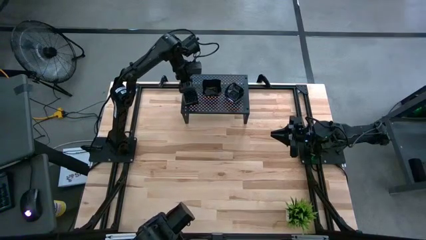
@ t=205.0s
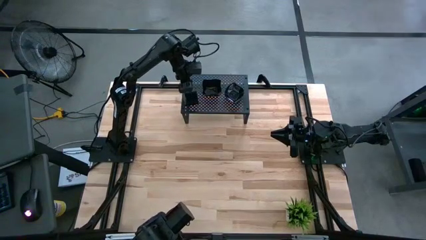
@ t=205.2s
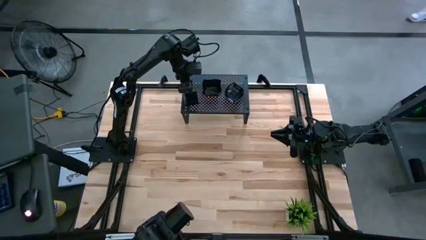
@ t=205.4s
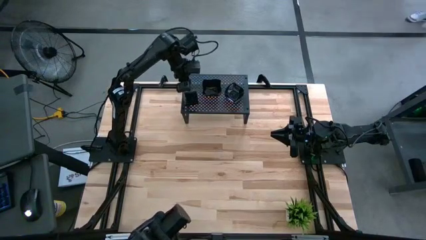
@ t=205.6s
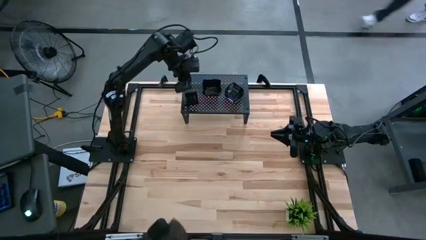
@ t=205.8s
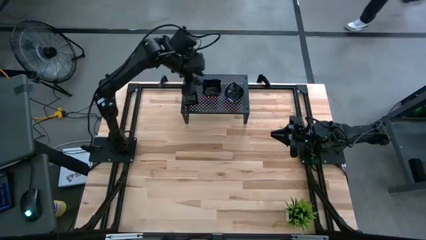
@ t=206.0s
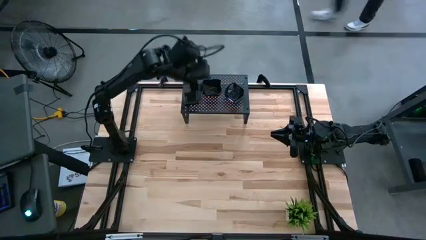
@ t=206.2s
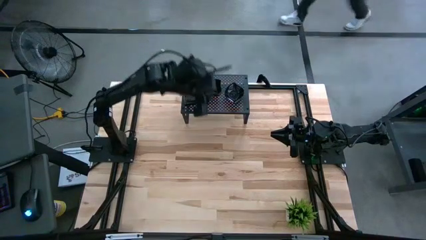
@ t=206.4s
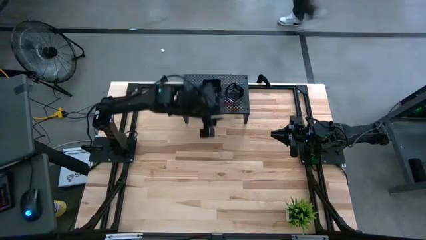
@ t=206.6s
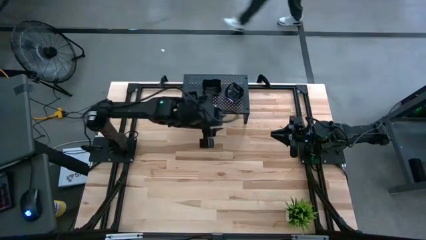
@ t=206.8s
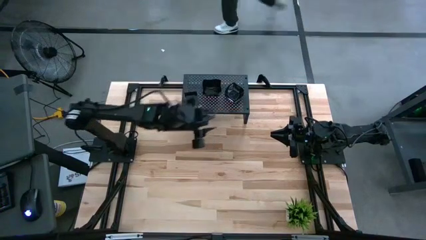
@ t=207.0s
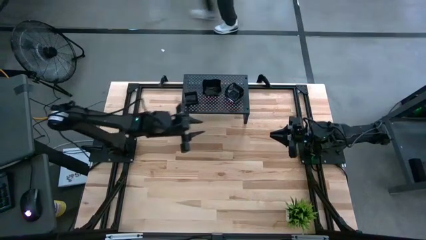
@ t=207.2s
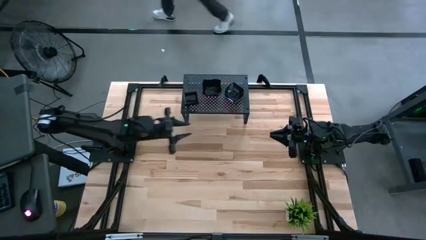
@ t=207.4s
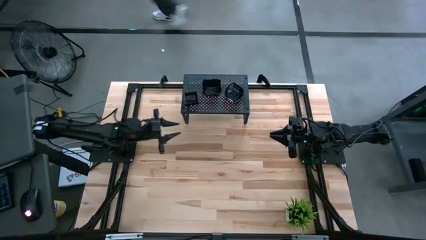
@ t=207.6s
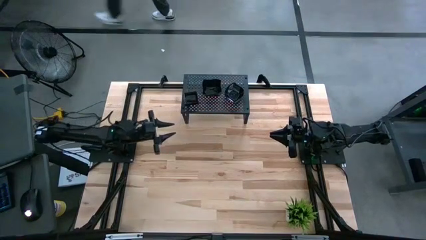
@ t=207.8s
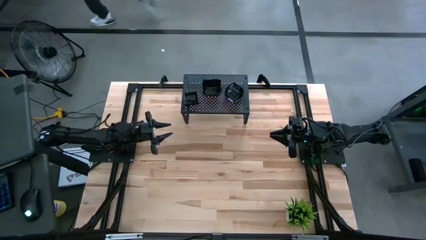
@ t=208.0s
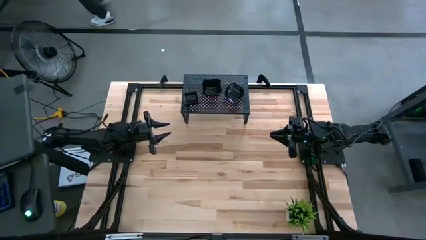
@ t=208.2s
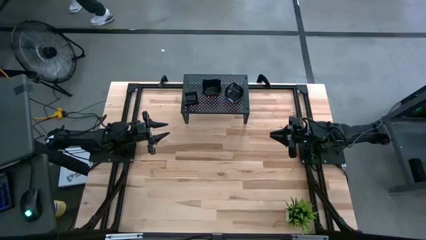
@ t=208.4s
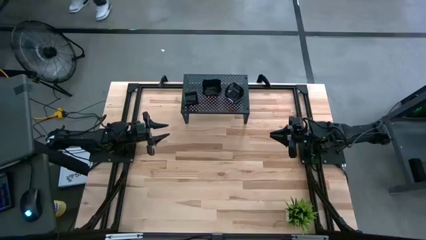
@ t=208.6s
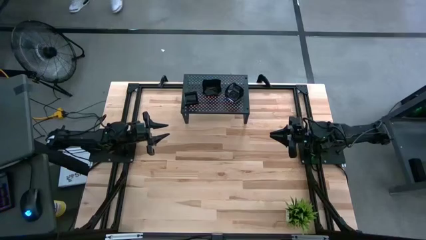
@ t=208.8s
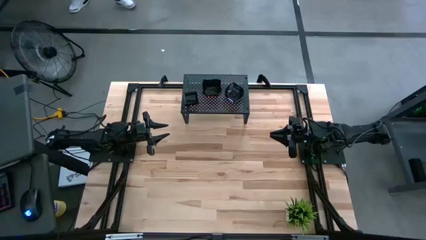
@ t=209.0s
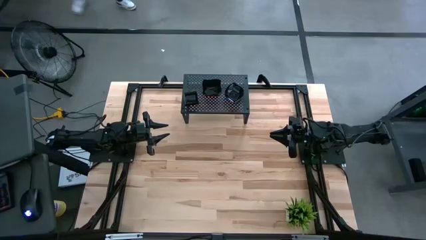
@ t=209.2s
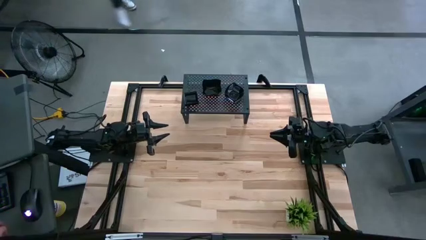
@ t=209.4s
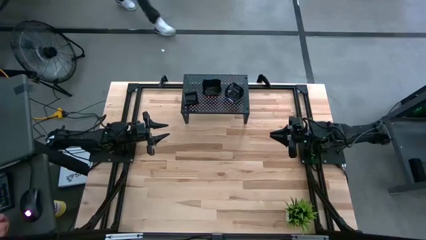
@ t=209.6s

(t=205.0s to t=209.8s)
Task: Pick & Place Mini shaped plates
Return to home position

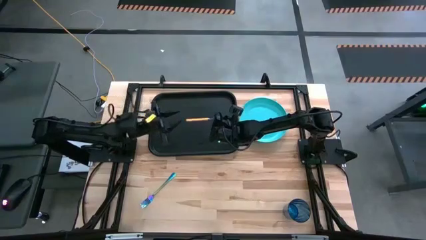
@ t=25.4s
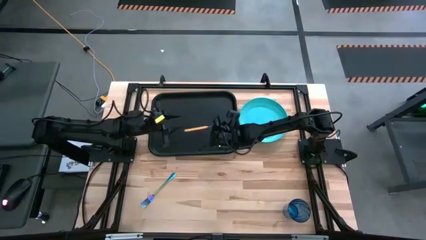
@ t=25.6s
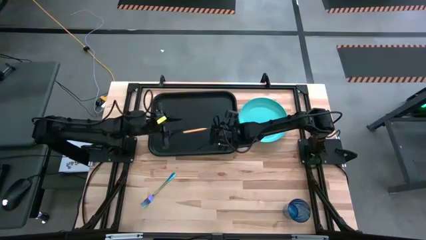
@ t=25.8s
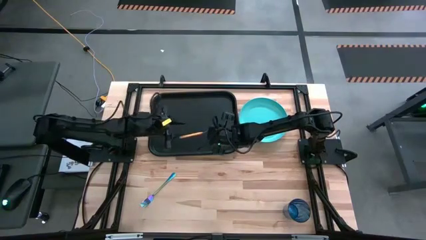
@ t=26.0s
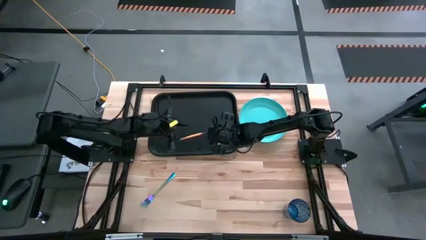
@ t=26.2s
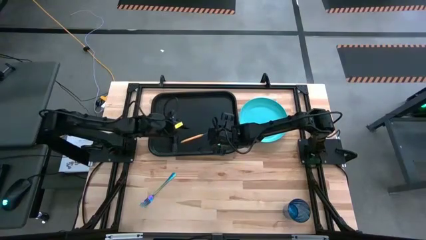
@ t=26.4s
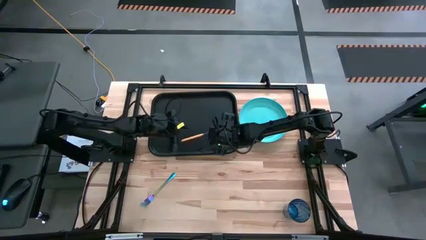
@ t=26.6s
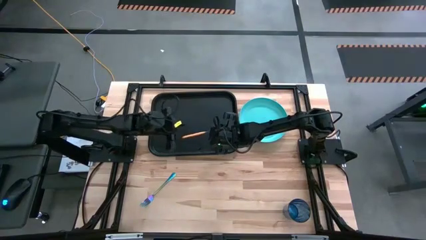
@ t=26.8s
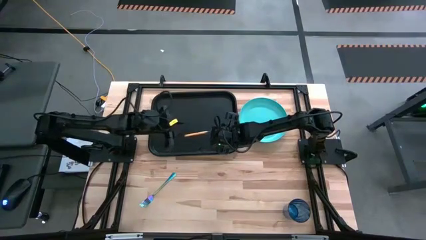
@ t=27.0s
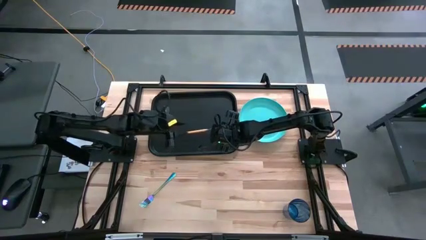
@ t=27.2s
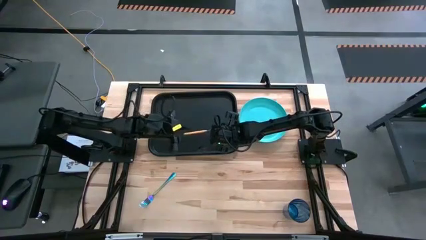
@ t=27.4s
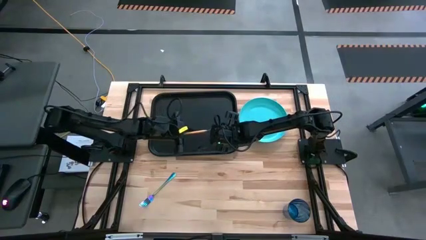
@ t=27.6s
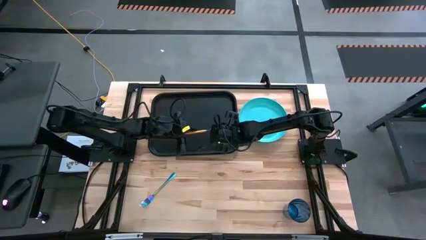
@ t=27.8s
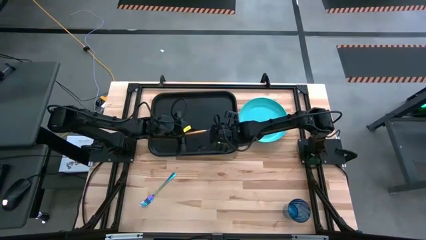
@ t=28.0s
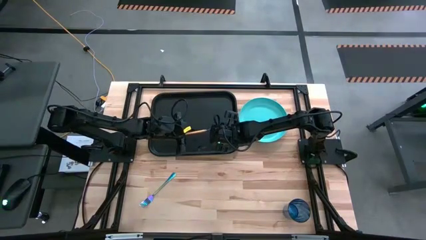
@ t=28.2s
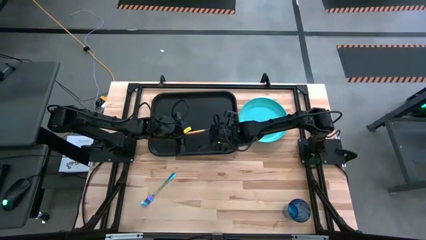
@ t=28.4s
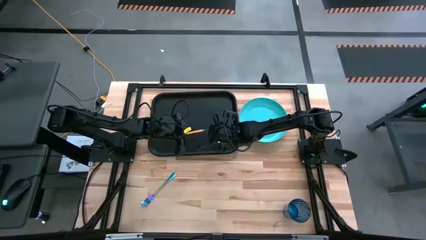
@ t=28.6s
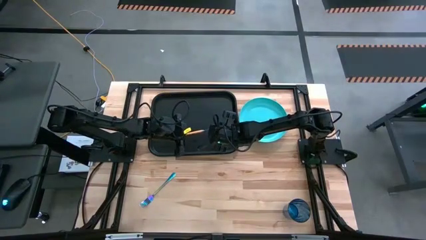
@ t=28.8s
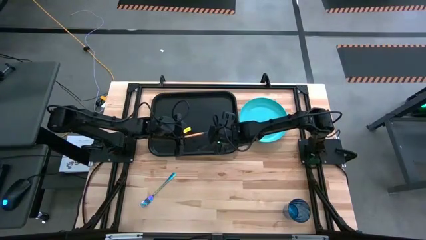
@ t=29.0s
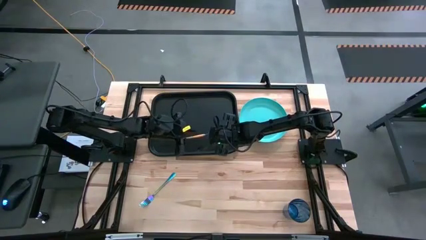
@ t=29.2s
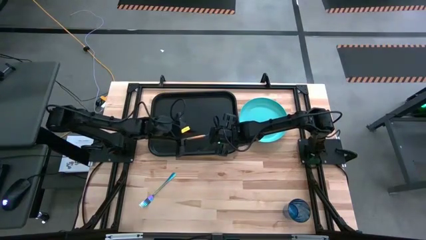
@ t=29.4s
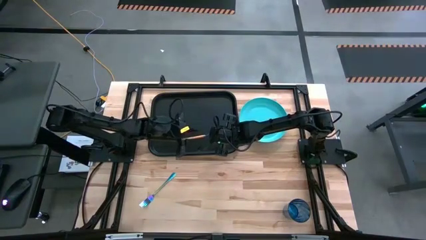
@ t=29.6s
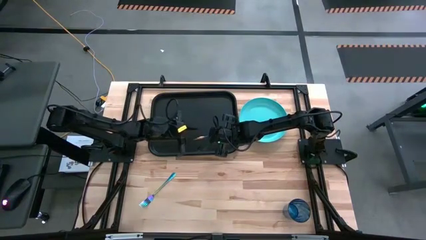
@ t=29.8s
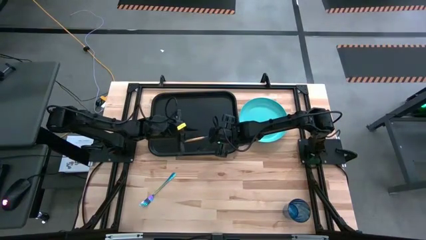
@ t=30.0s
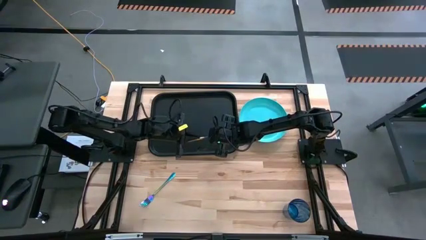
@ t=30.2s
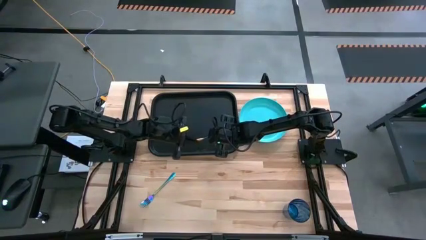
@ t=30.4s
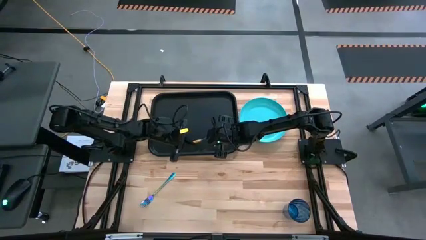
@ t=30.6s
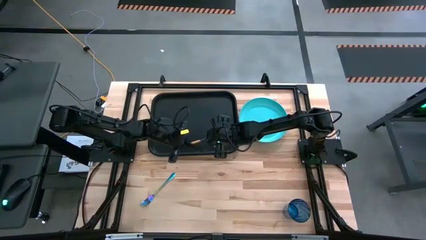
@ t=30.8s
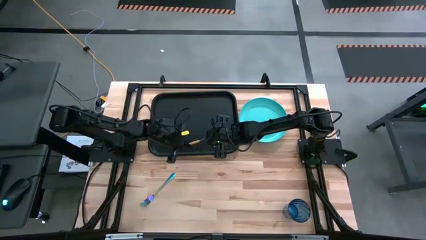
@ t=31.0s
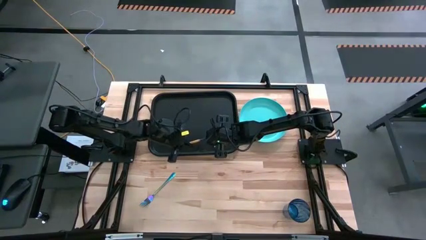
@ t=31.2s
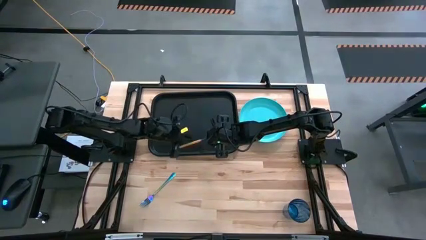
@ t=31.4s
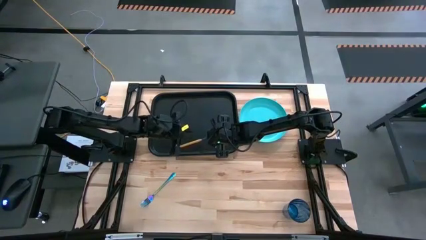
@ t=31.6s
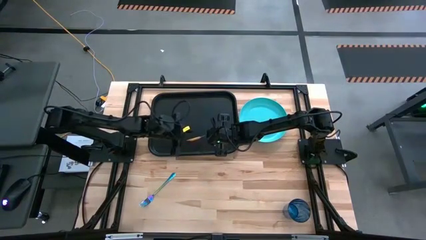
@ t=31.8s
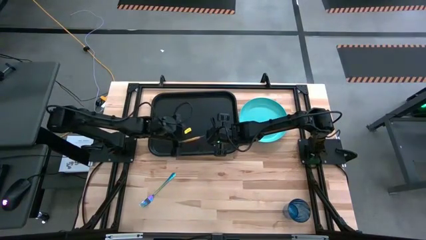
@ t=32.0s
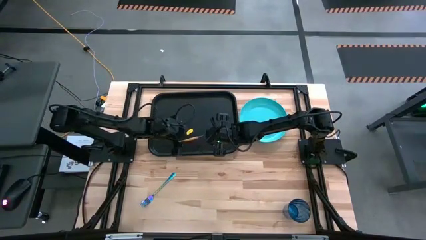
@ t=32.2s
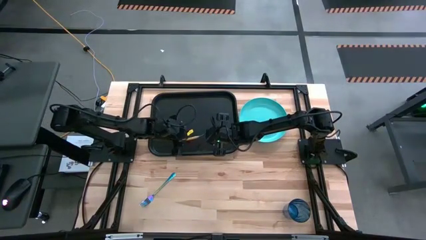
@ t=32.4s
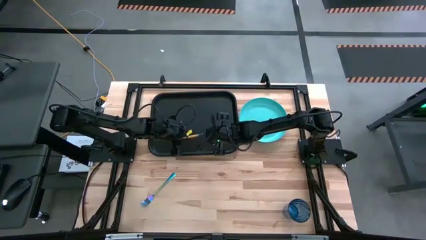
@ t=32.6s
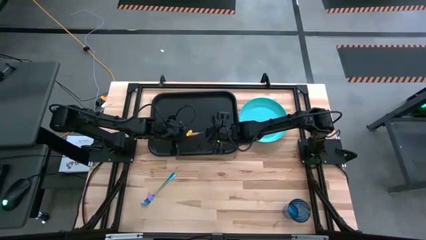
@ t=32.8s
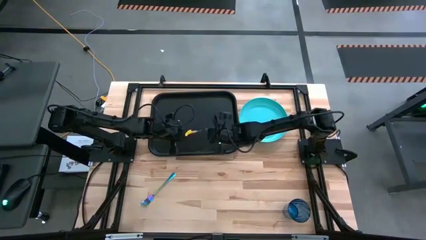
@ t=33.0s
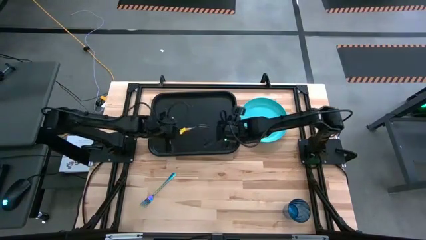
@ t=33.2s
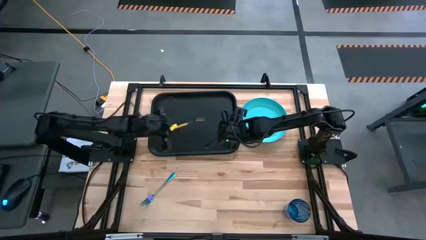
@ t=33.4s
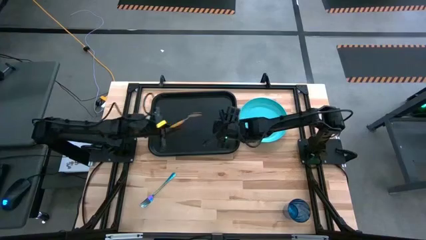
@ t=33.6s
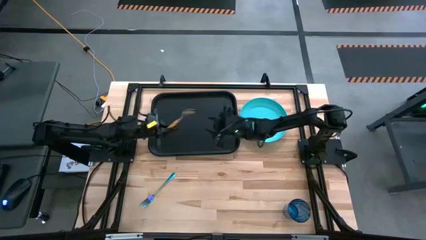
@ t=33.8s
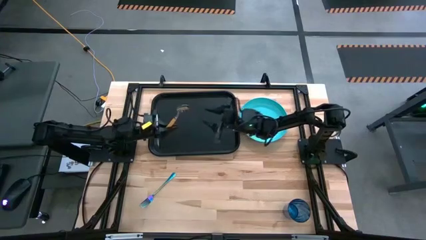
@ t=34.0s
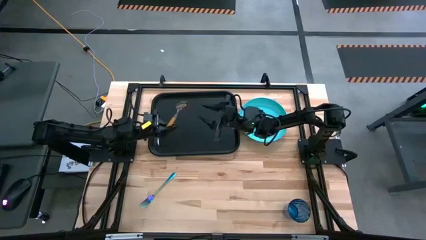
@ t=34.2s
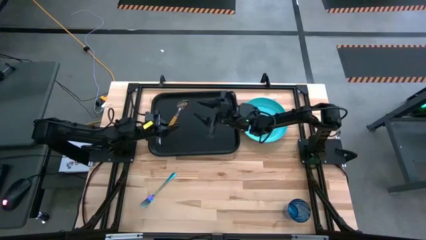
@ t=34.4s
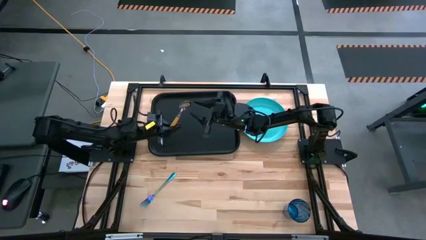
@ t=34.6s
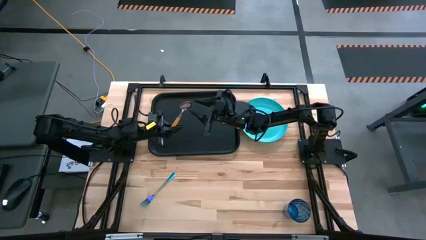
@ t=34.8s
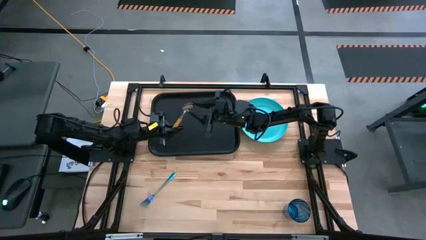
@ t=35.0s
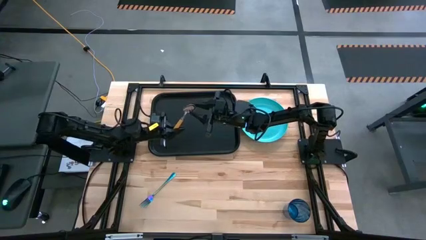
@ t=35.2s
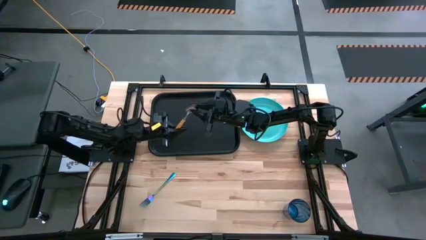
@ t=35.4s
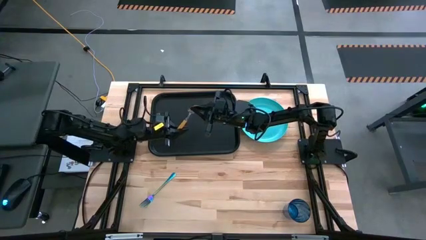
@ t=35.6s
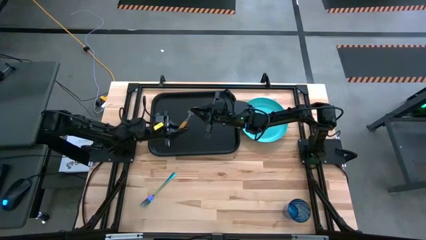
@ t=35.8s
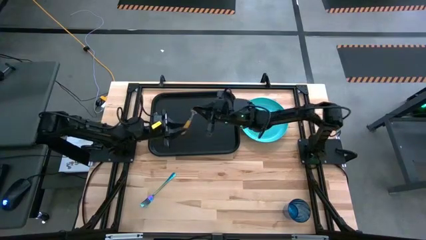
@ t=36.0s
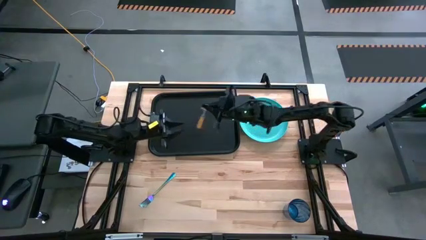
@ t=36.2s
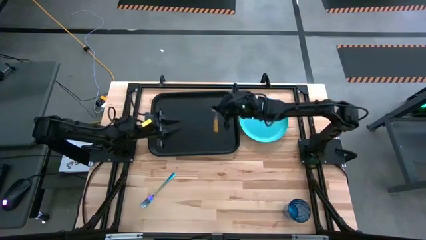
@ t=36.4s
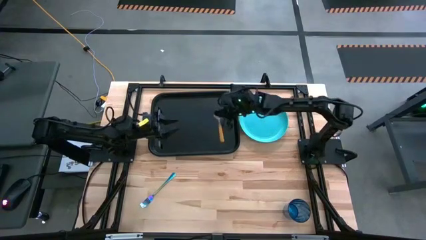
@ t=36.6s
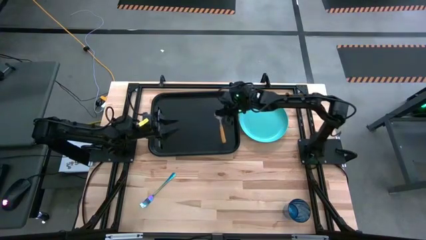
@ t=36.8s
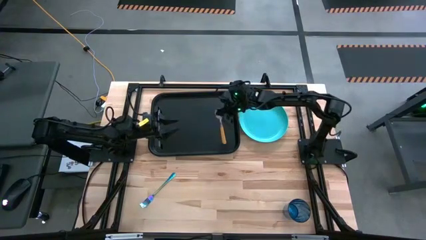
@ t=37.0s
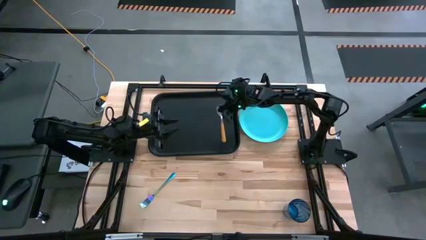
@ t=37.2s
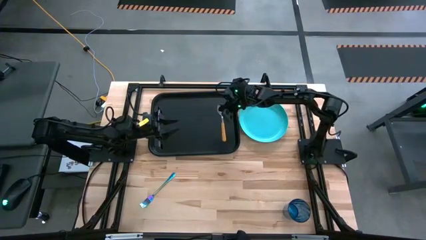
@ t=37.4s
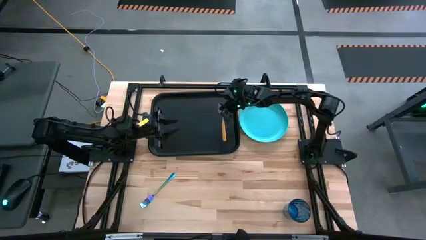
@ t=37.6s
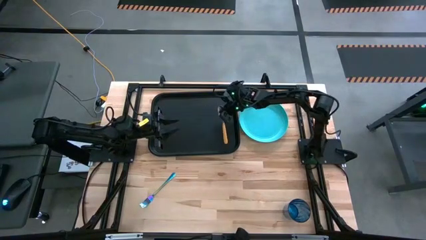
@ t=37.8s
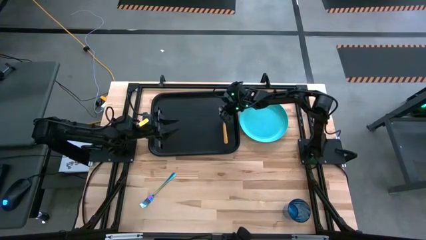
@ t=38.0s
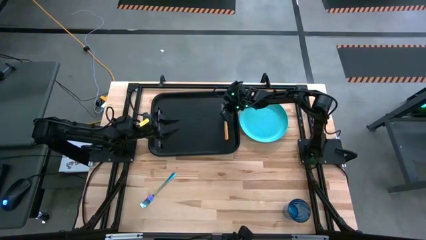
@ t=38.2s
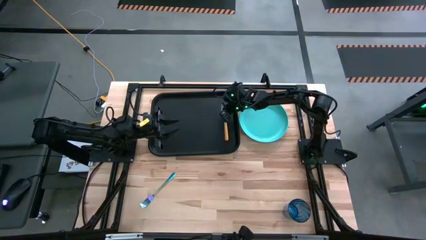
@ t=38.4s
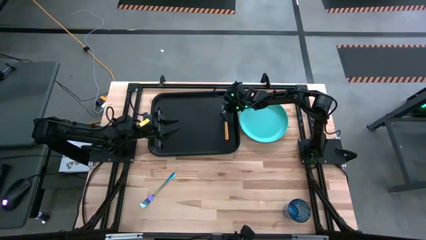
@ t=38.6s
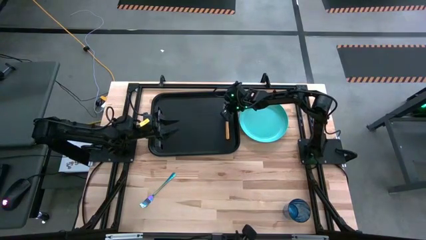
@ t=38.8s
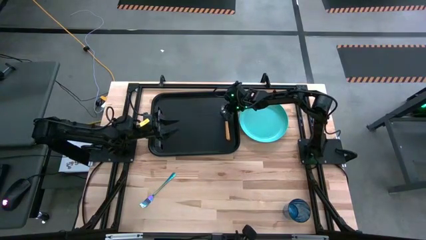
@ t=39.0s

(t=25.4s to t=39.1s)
Task: Pick and place plate/cup/fork/spoon on tray
Put the yellow spoon on the black serving tray
